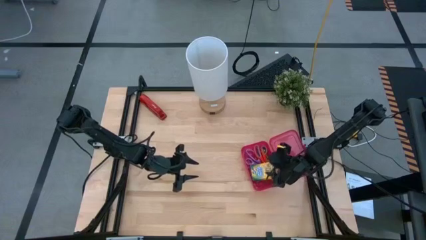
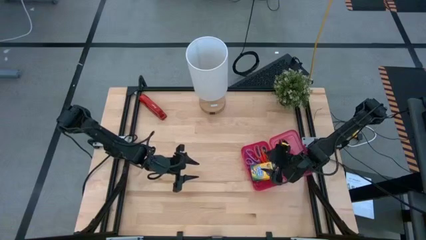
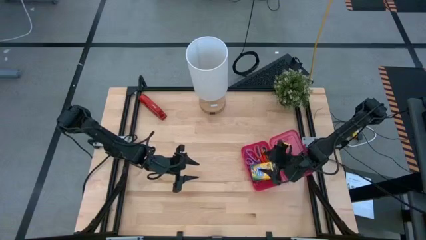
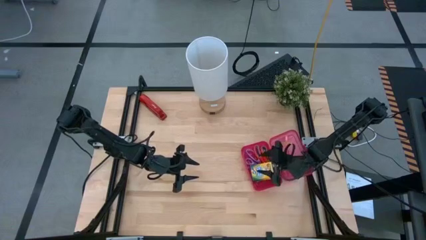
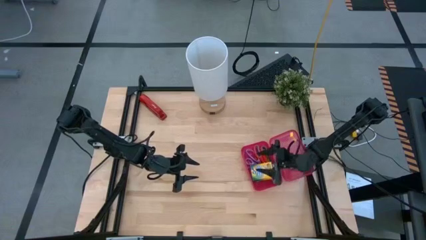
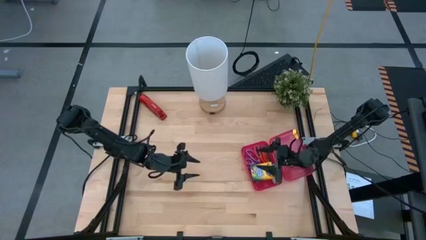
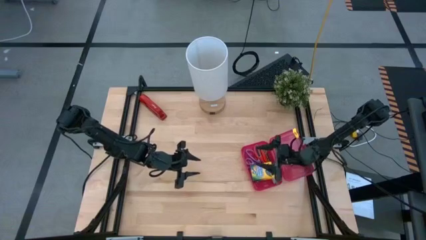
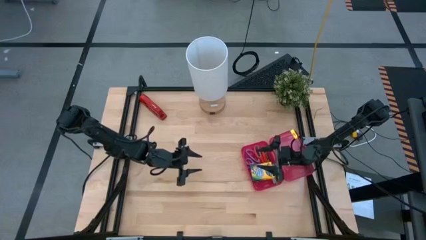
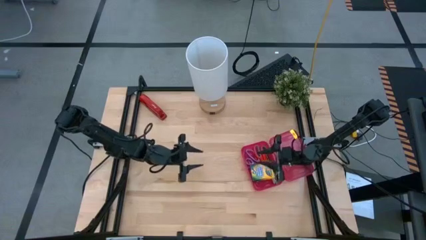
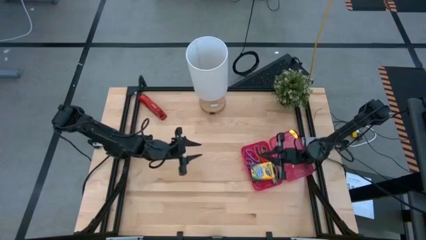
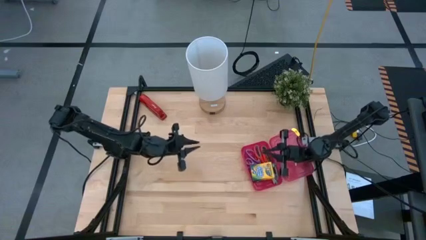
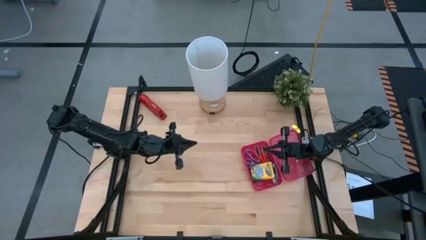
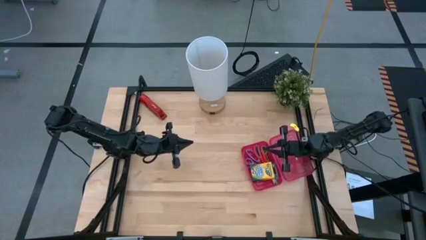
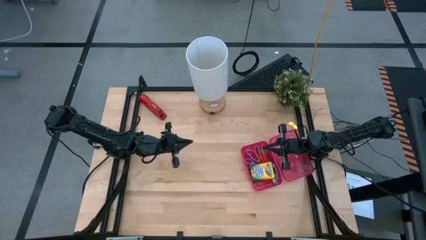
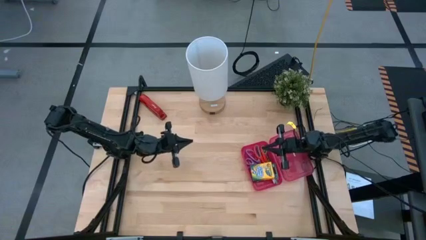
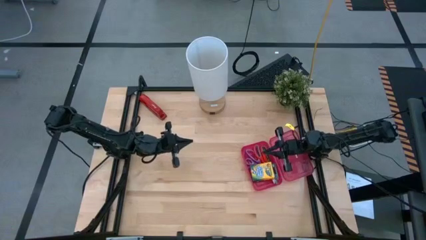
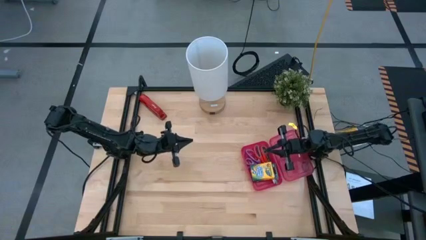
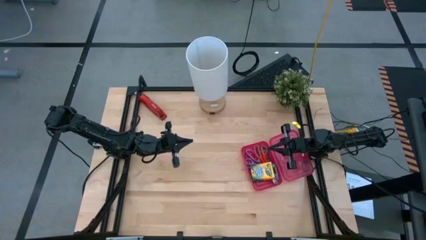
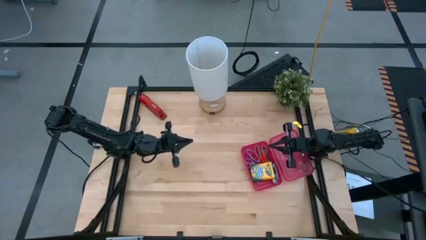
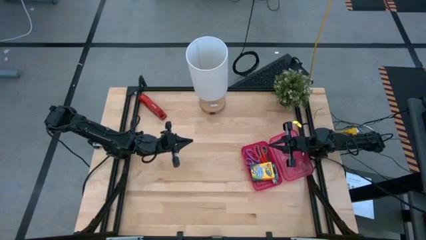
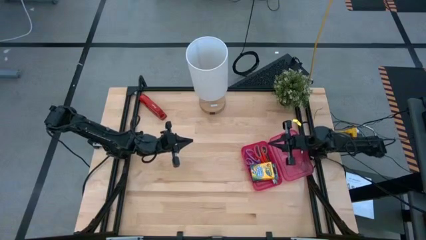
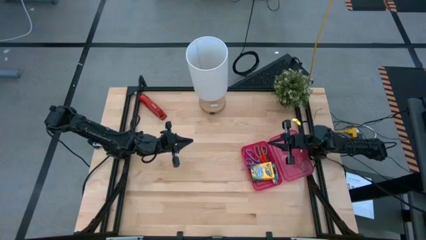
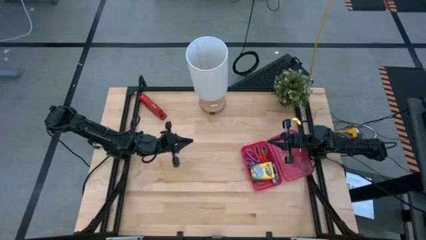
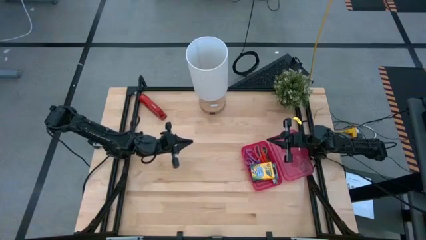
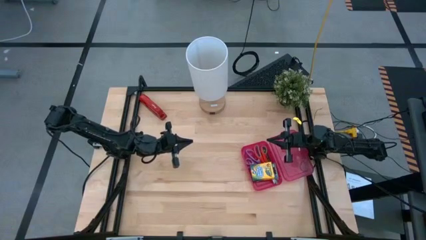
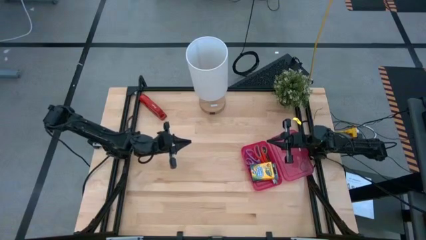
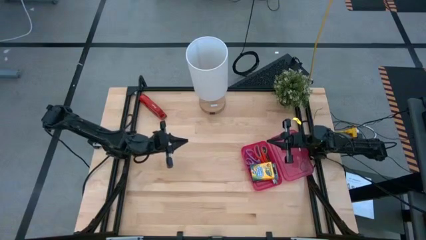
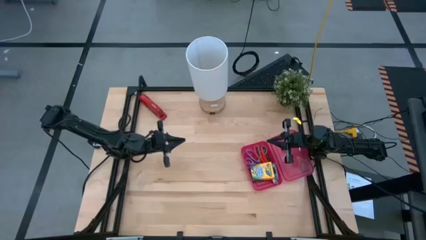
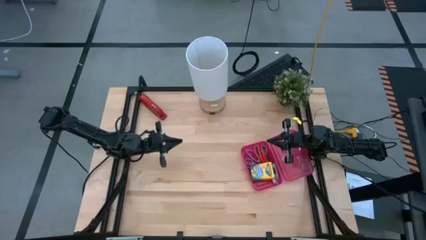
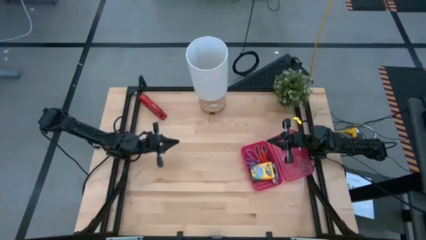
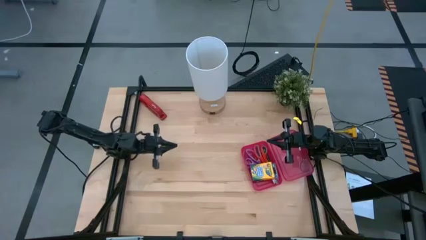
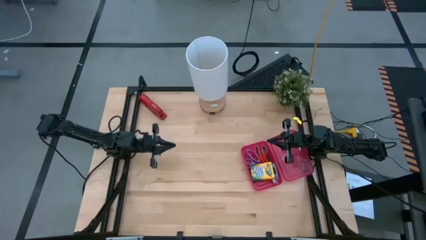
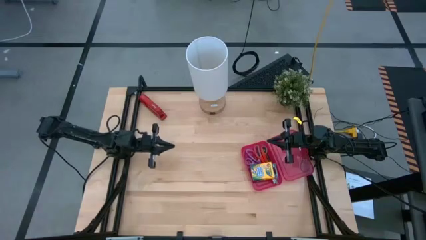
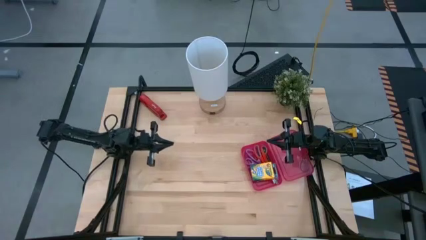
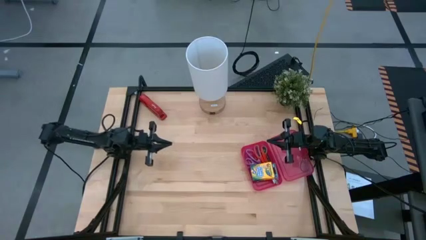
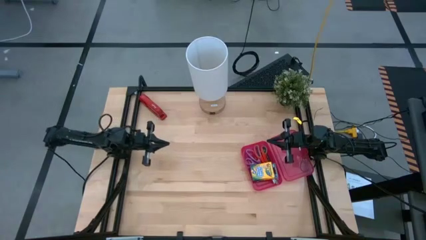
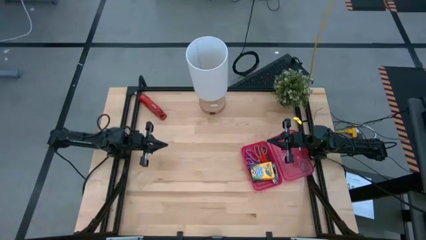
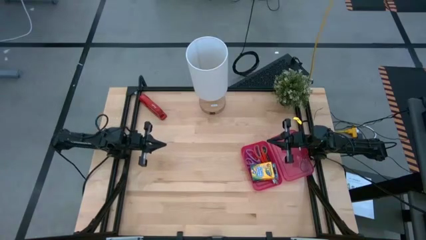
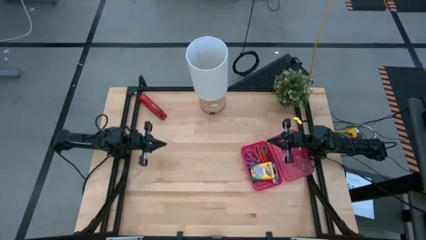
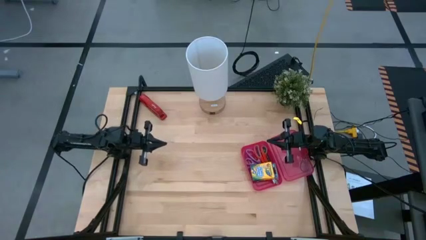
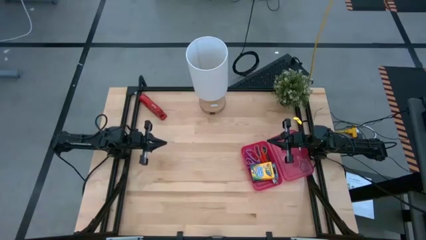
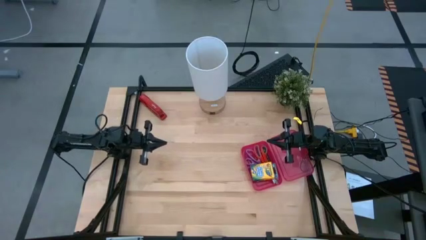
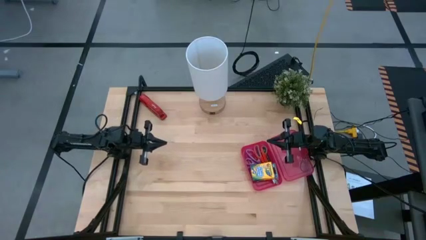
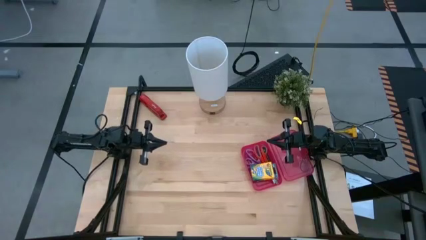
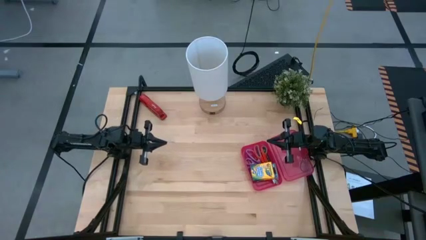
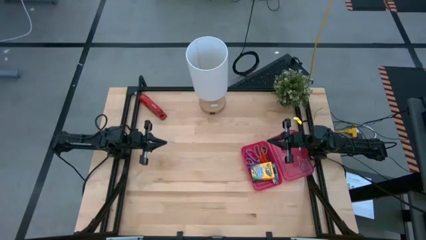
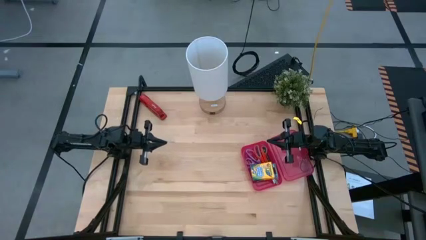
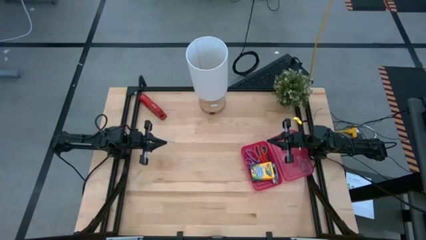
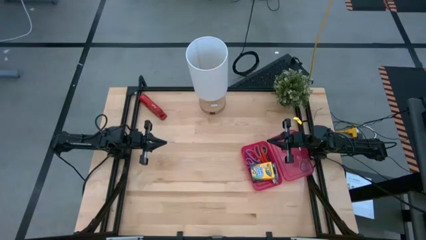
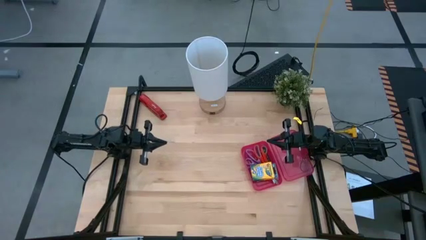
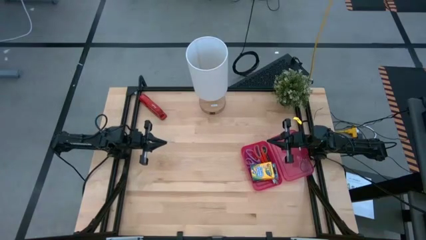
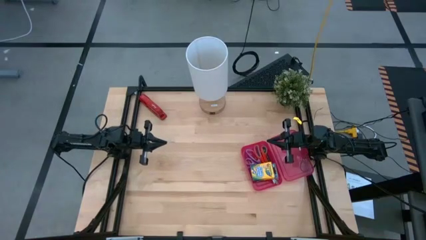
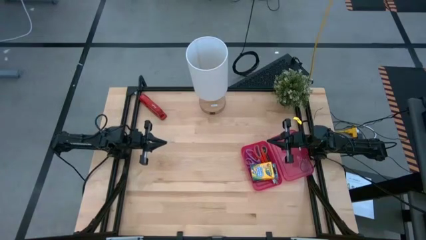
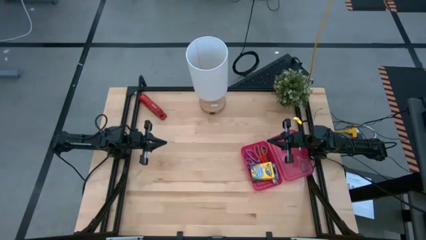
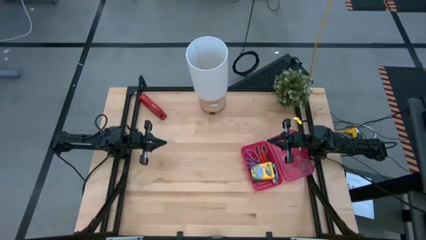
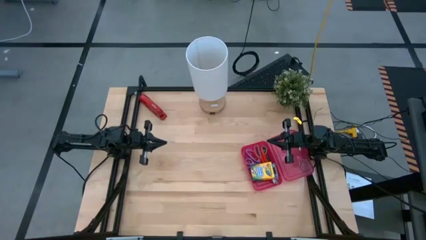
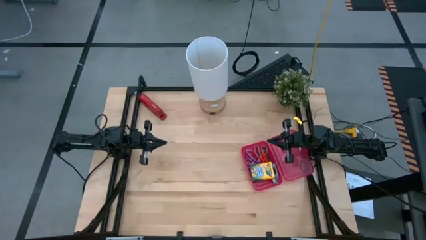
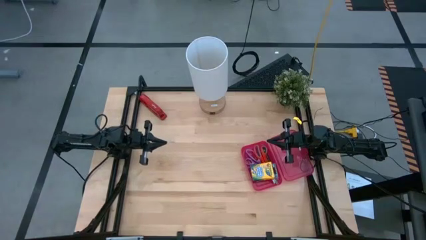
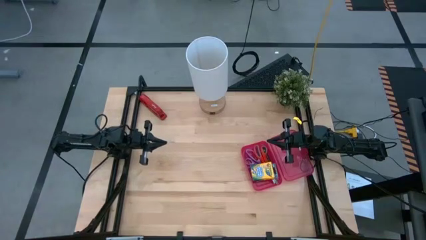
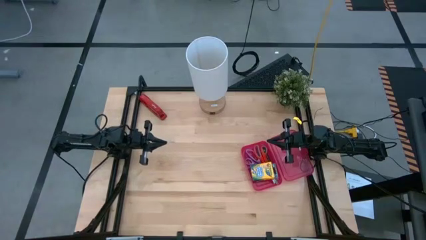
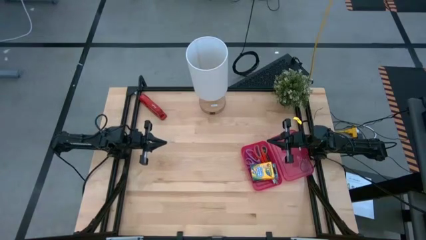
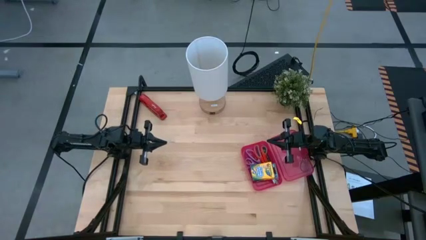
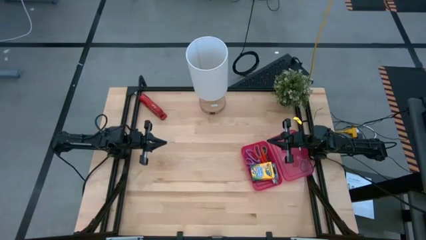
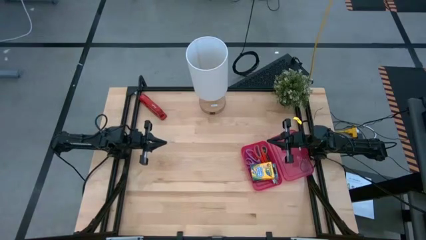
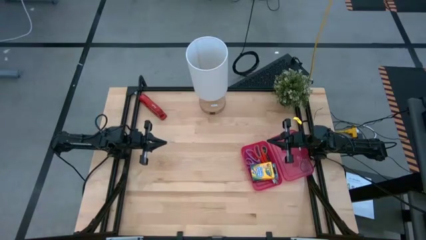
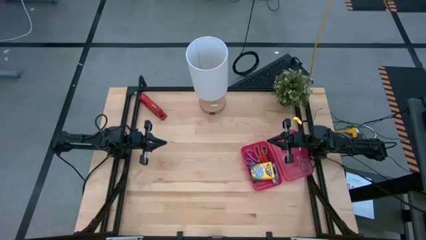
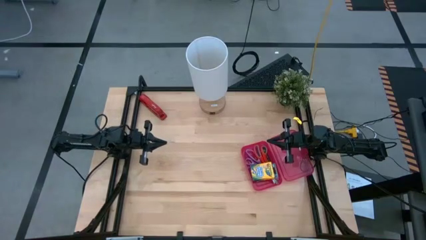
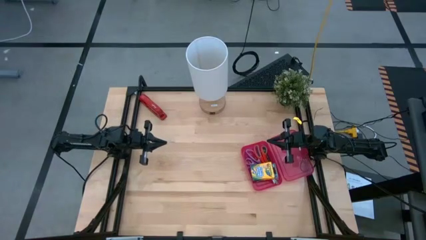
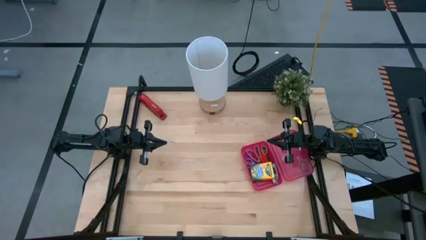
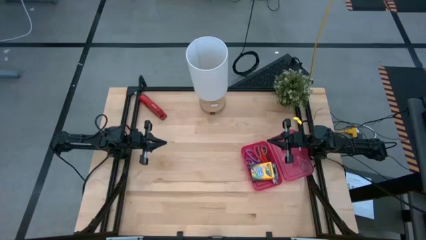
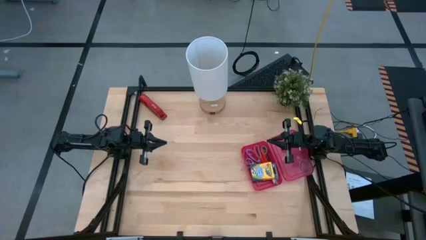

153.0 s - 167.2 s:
Task: Pack school essentials
Return to Home Position

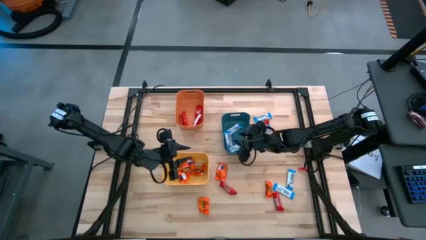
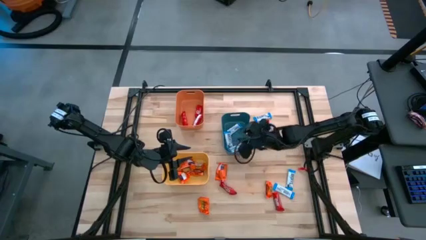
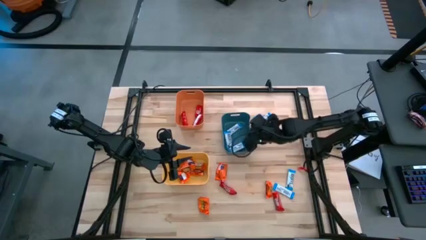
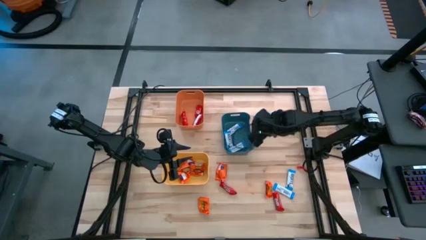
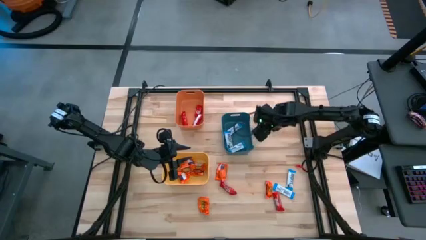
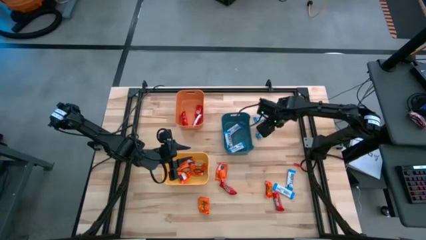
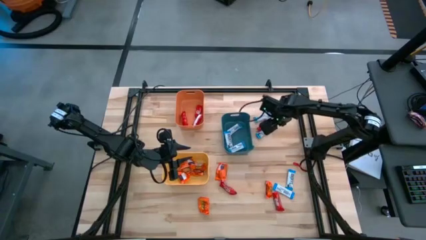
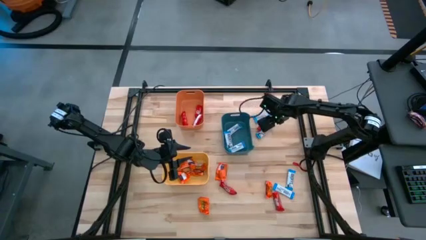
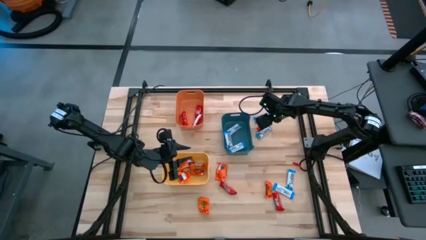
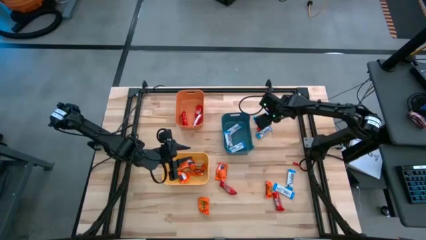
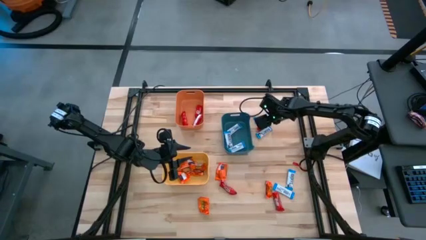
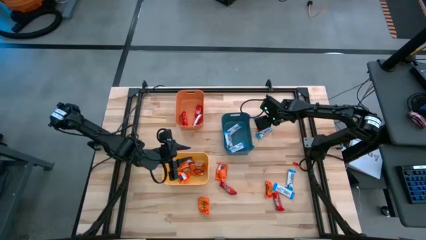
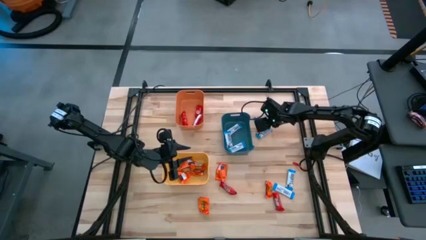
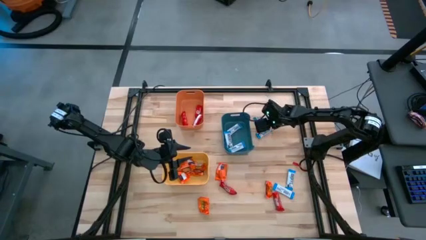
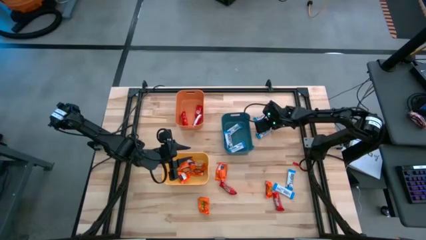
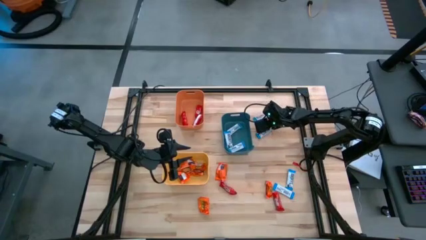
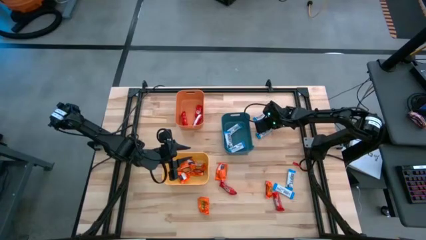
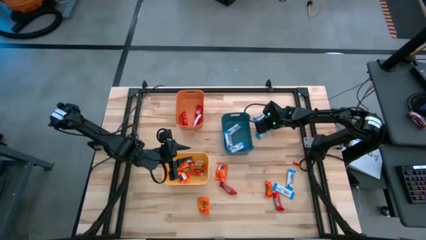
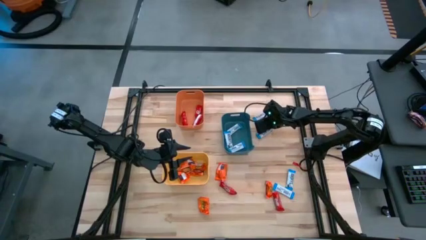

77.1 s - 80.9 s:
Task: Organize candy in baskets
Put the red chocolate into the orange bin
